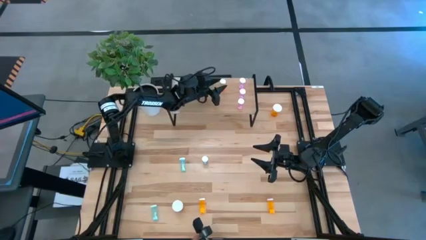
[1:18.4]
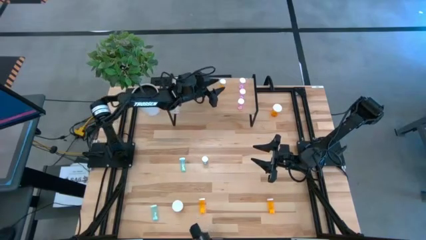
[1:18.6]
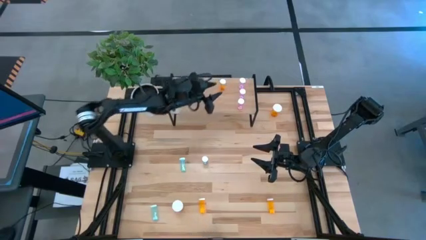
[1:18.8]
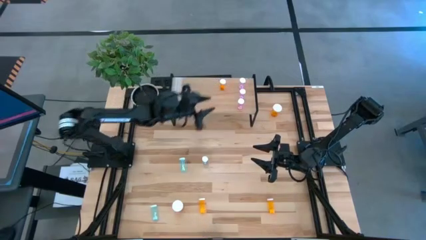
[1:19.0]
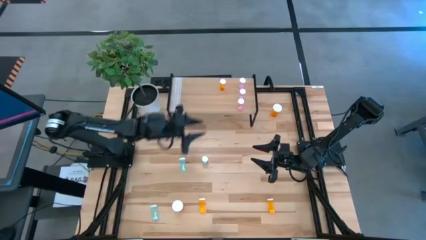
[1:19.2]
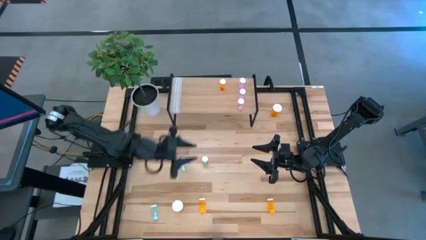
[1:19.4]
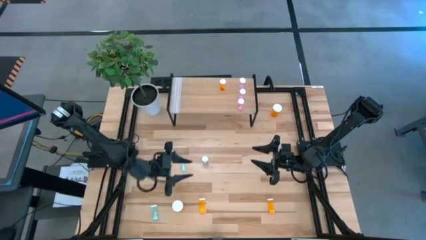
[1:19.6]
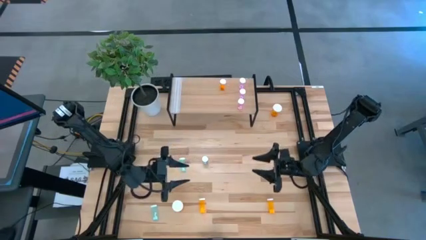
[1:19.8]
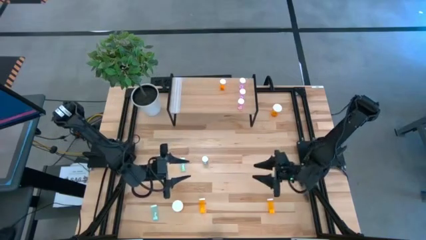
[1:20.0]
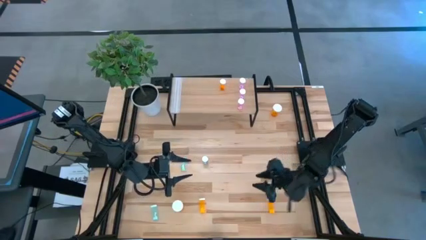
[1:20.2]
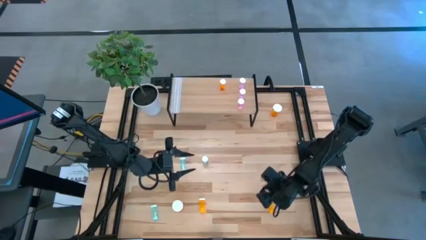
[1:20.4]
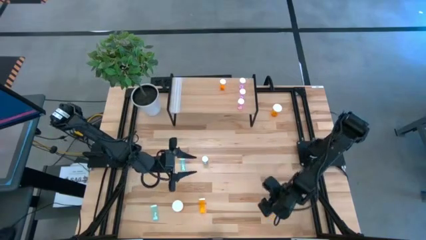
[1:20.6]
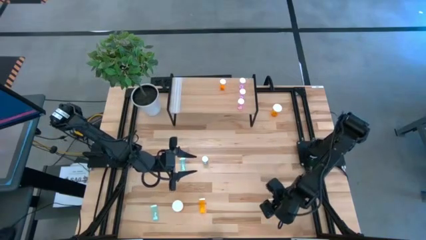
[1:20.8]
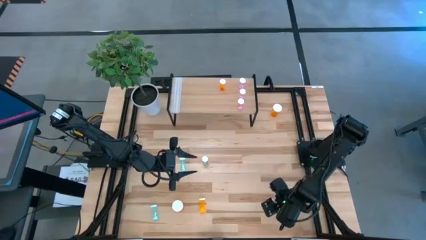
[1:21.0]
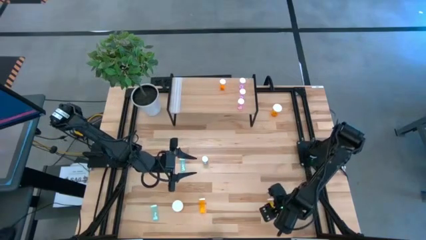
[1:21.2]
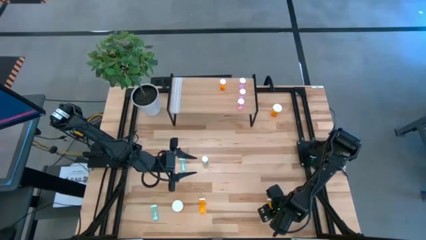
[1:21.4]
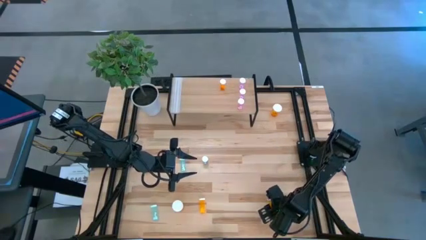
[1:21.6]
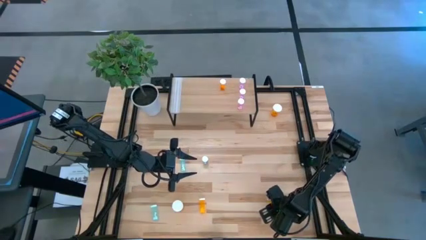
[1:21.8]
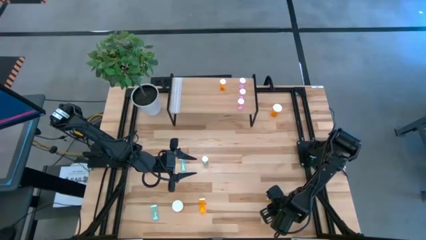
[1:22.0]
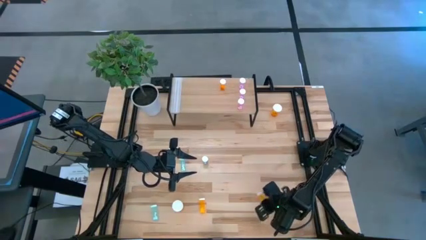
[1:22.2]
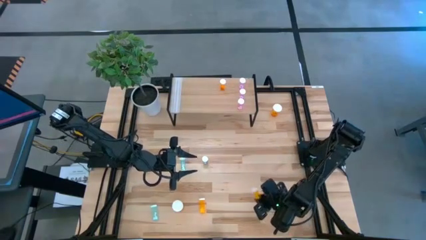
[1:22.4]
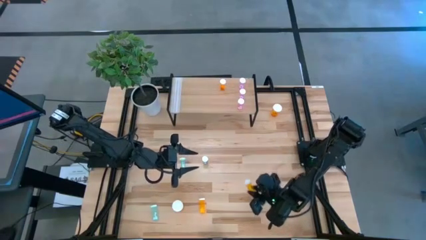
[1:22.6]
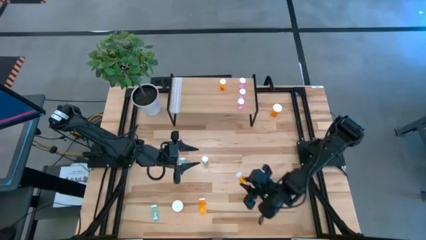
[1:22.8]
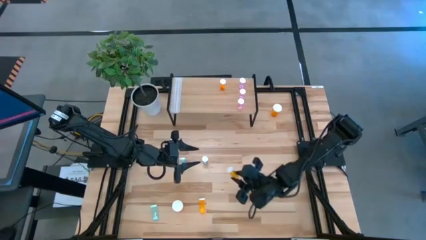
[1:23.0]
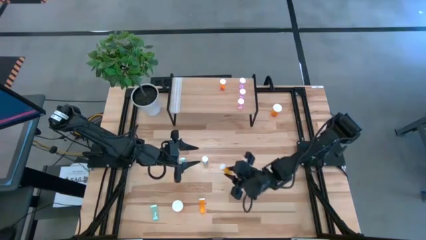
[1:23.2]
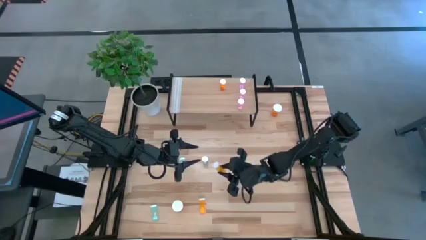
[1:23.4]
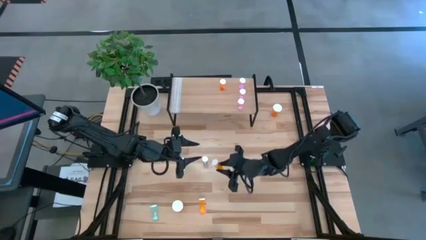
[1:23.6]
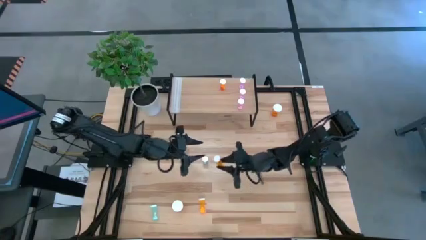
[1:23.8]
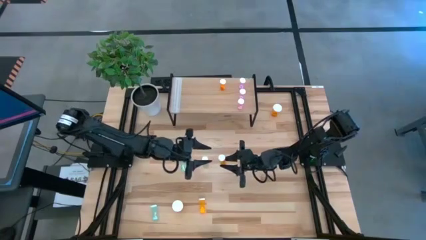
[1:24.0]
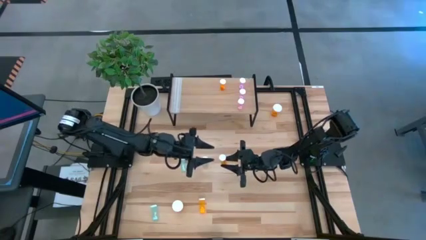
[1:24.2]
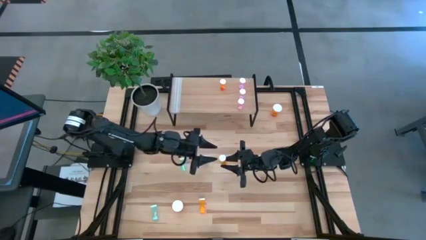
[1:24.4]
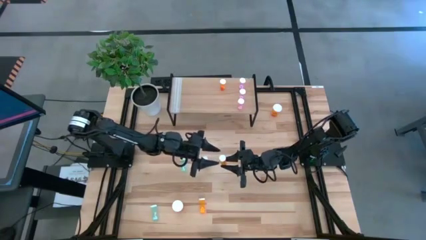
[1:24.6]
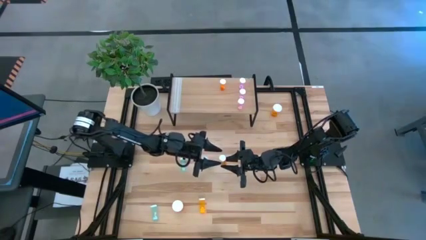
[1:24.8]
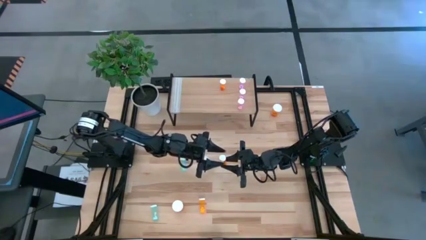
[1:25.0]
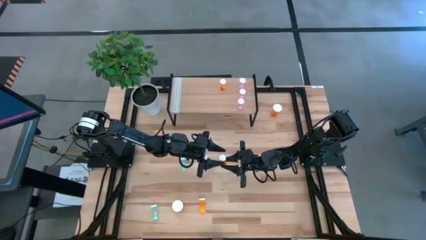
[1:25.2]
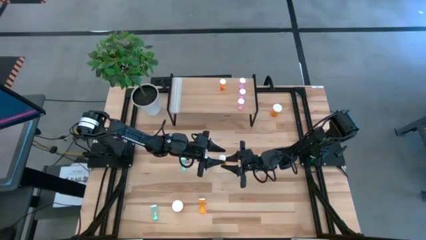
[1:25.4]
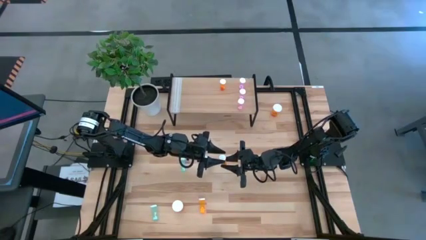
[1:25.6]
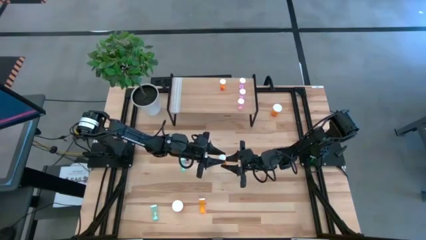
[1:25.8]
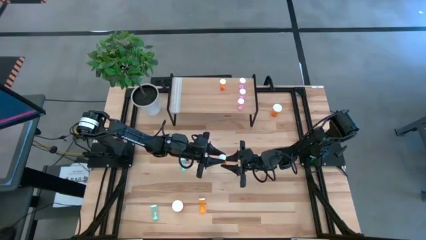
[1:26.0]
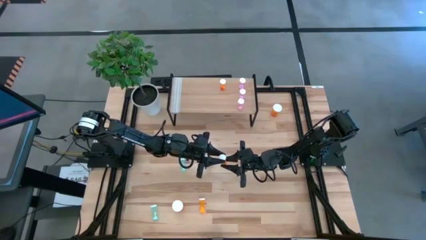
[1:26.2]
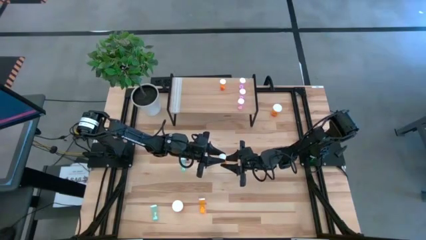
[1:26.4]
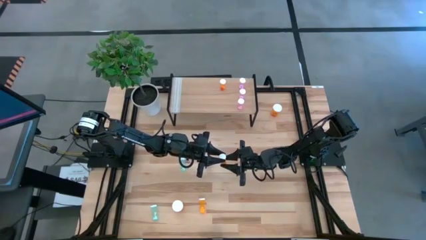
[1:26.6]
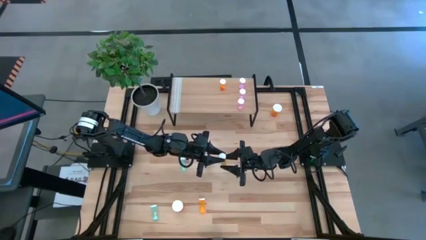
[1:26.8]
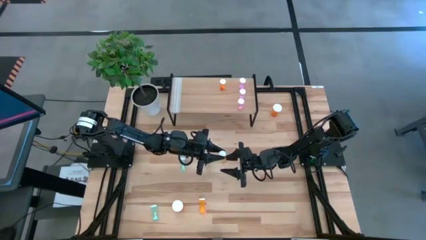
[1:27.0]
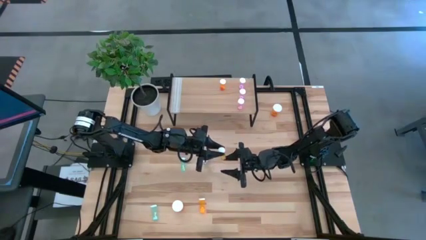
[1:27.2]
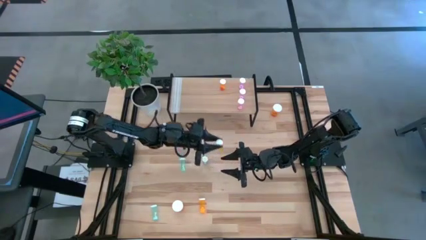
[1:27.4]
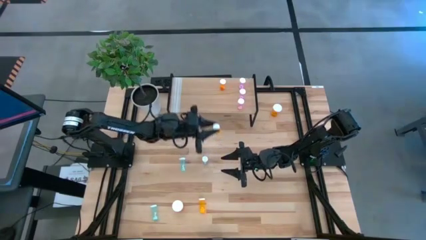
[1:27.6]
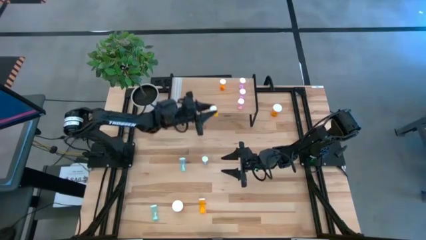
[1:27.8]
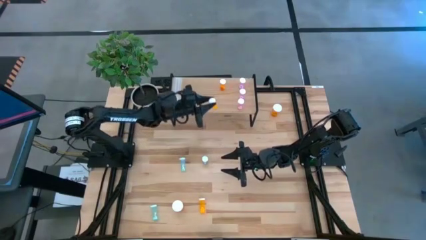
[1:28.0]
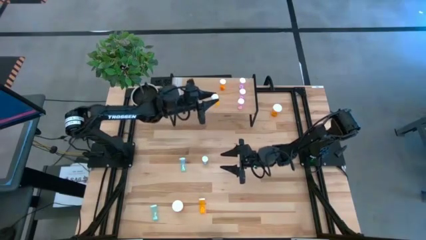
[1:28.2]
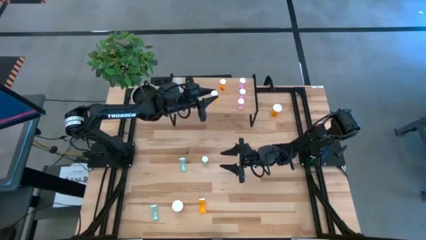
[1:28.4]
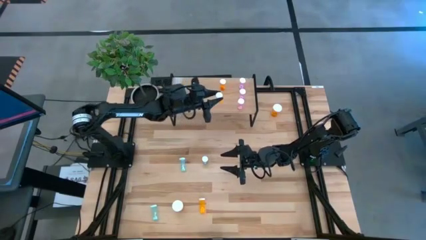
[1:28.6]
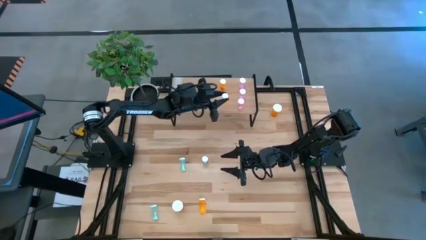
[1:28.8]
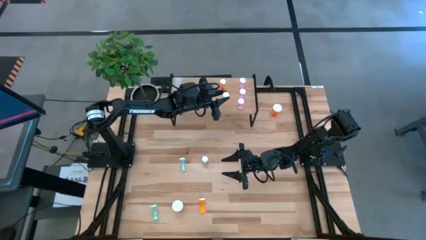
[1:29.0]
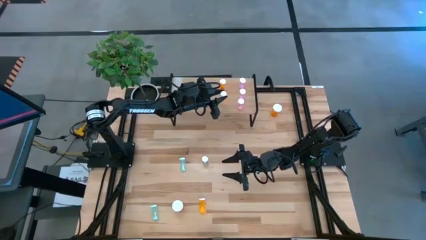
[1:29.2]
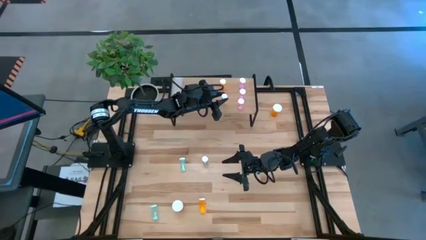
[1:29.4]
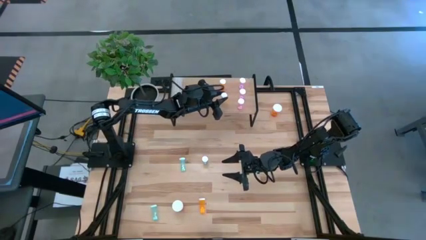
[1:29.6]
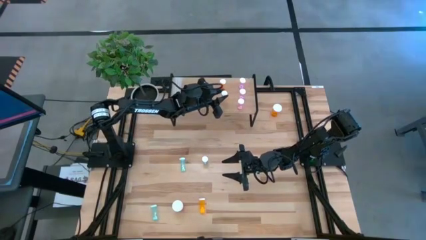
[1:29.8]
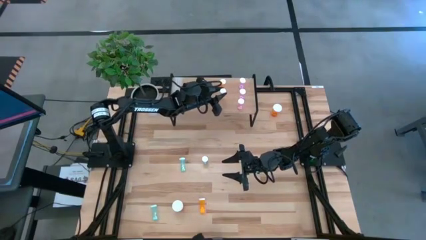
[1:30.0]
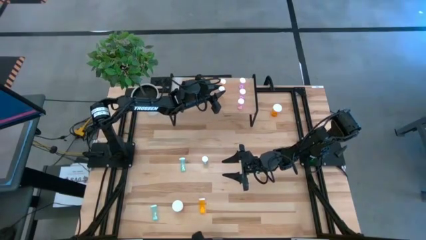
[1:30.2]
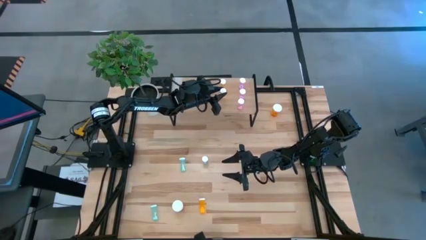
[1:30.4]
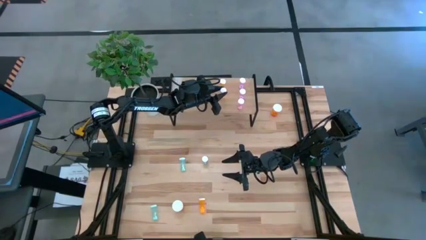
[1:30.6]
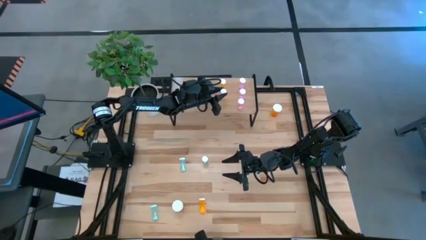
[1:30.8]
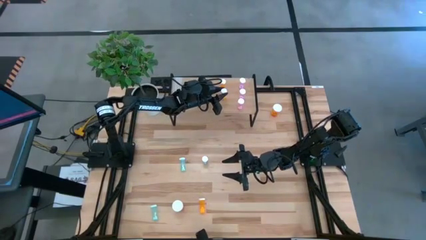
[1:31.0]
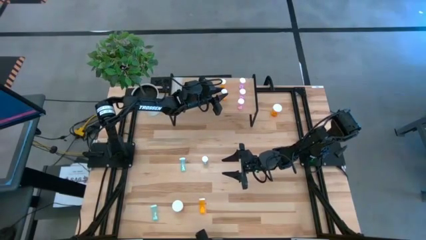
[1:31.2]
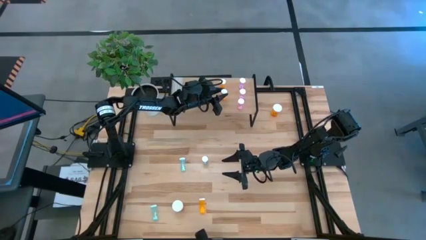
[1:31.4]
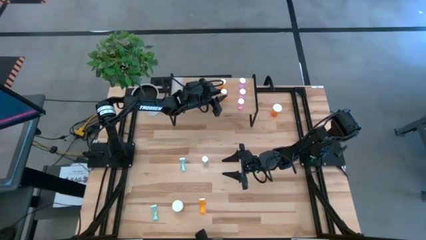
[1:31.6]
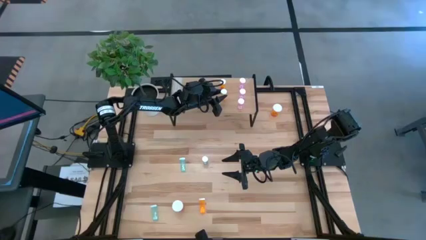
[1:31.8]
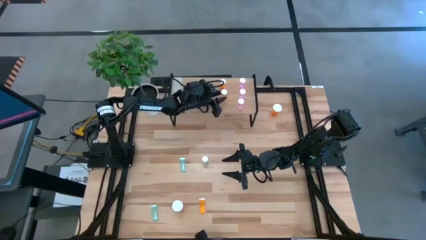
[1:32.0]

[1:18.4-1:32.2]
Task: Pick and place medicine bottles onto shelf by color
Put the right orange pill bottle on the shelf aligned with the other orange pill bottle

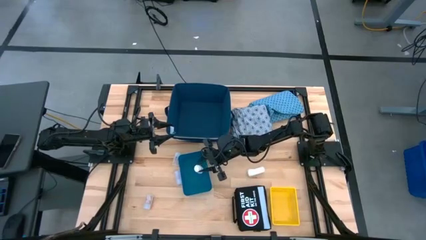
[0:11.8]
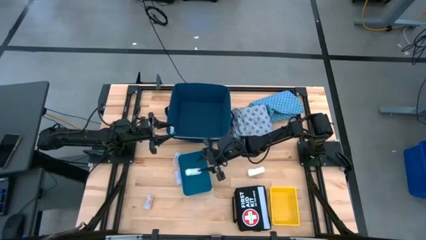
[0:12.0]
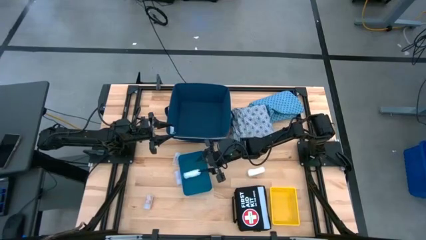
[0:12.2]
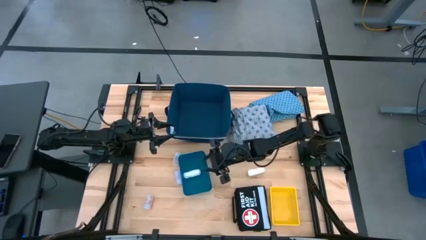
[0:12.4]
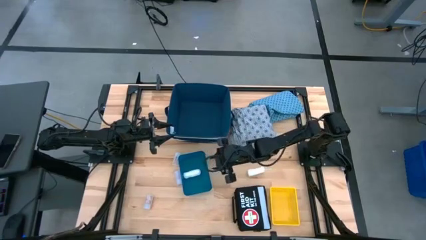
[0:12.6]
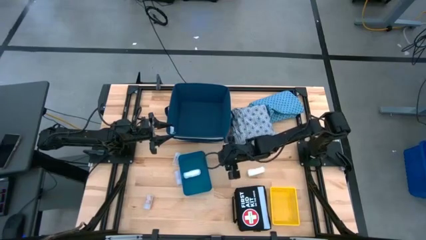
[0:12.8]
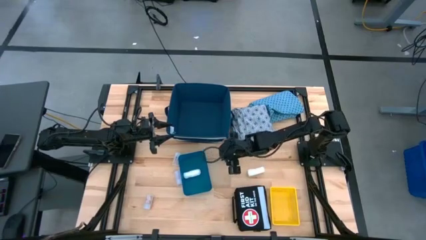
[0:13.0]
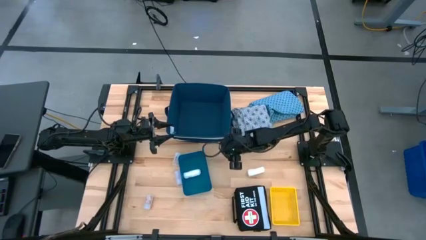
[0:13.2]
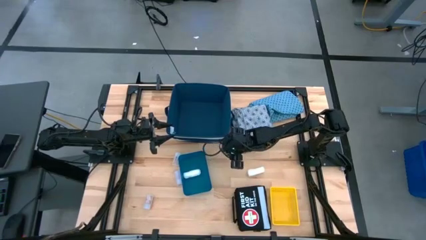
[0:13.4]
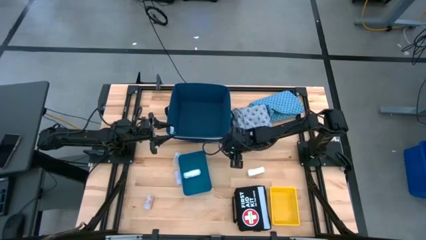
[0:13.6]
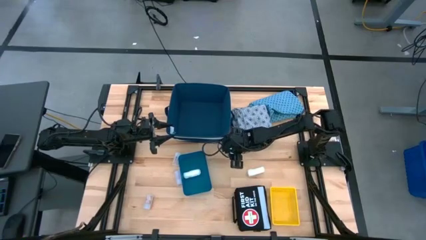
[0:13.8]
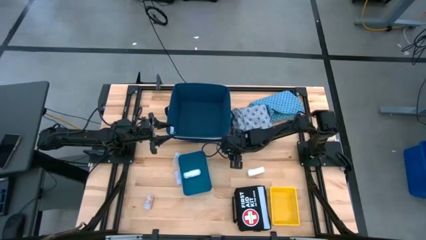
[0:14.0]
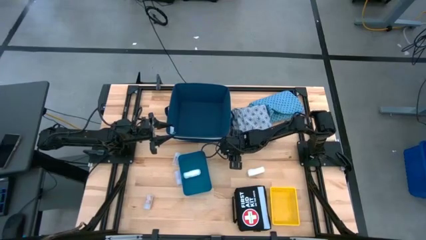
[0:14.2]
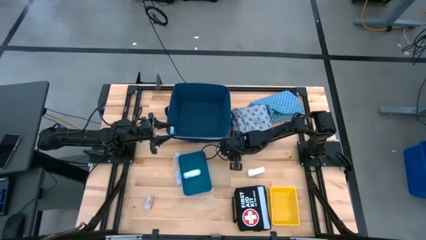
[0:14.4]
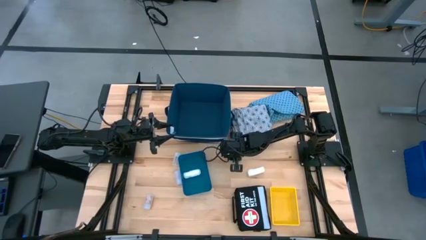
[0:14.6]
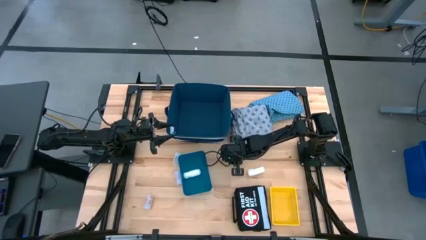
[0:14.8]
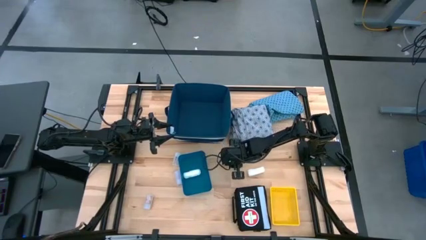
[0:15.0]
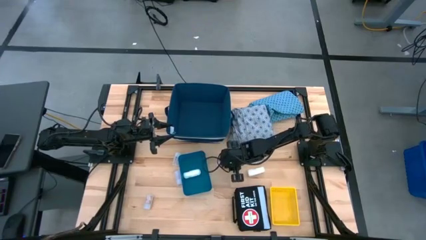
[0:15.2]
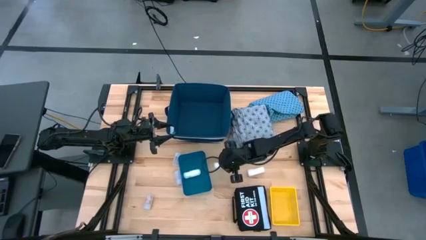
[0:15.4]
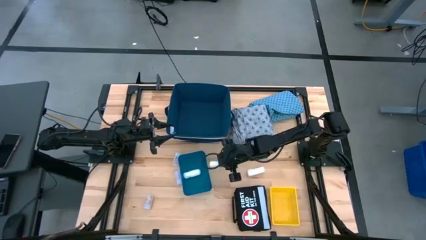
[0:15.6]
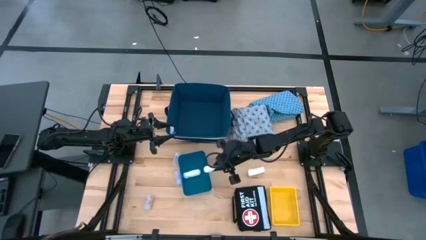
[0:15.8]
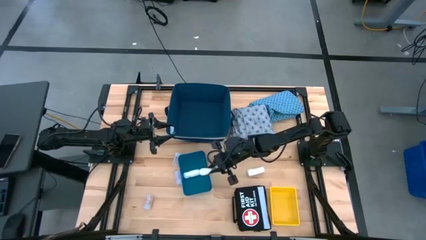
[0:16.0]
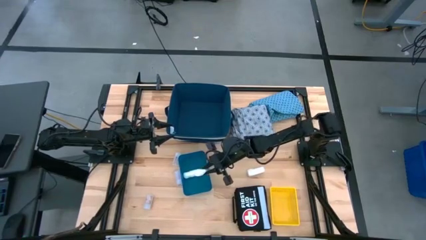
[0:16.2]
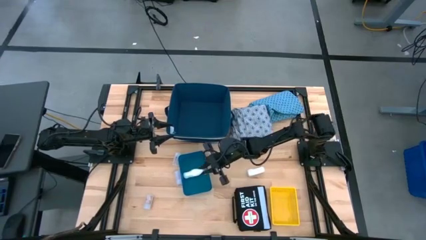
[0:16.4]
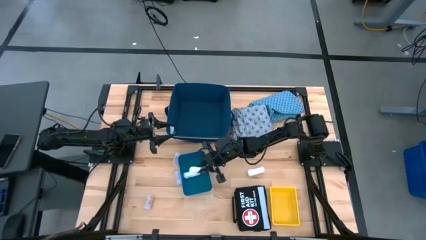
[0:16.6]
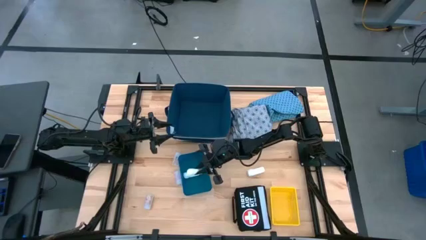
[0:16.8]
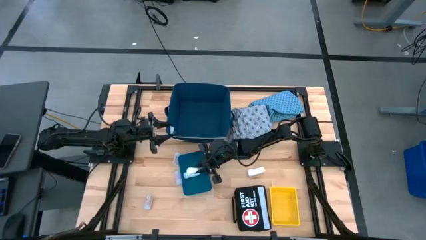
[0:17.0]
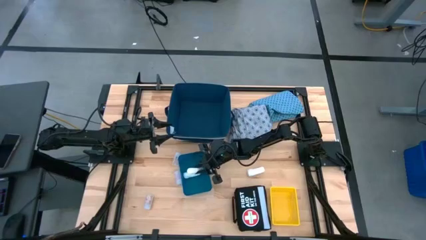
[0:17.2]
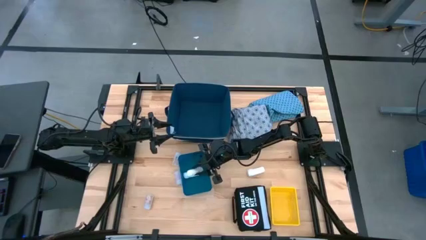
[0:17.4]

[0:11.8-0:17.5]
Task: Pick & place medical supplies in basket/bin
Put the left white gauze in the blue bin
